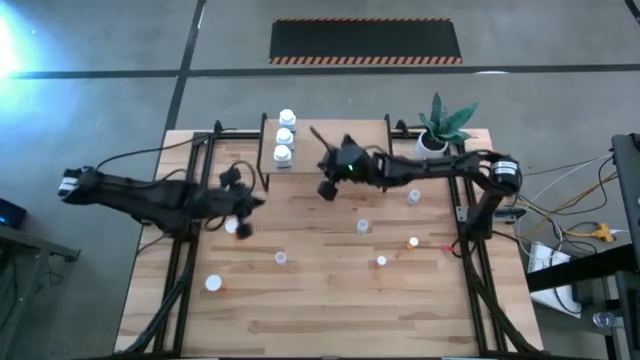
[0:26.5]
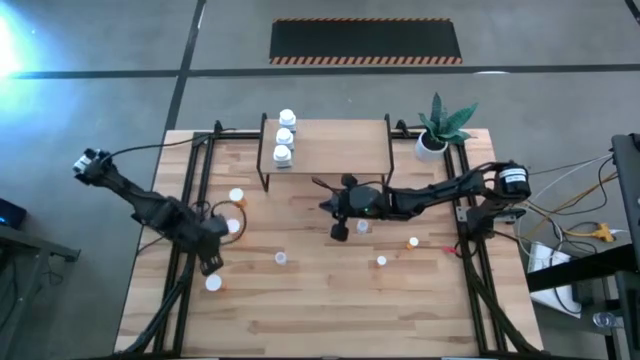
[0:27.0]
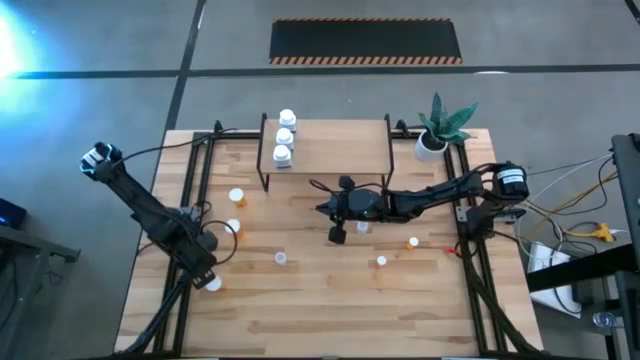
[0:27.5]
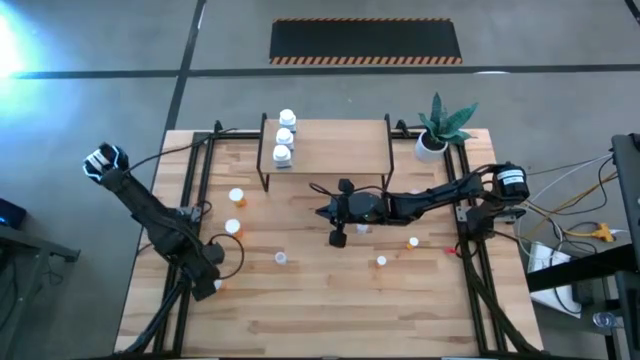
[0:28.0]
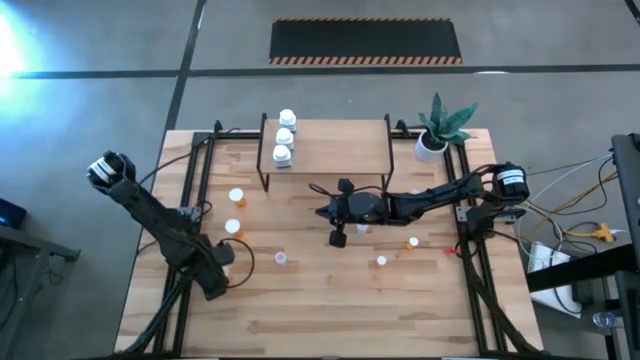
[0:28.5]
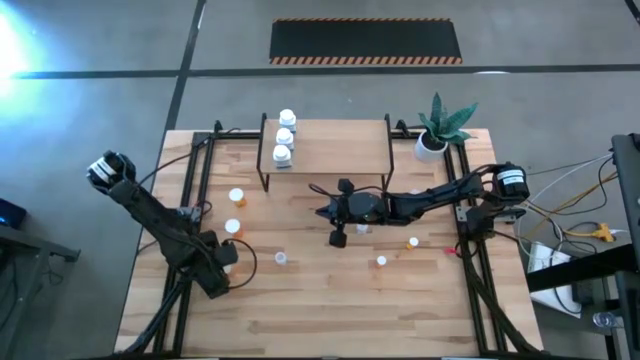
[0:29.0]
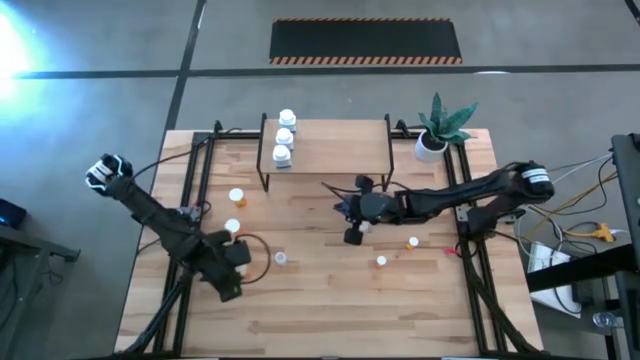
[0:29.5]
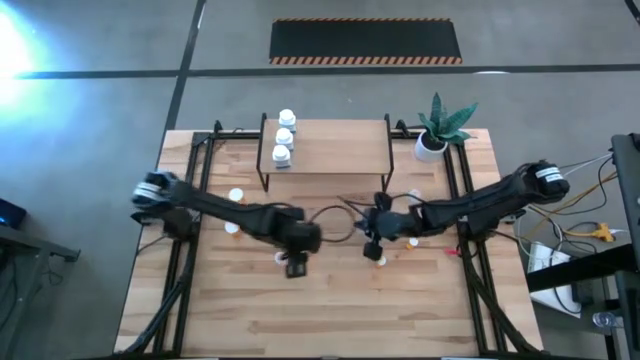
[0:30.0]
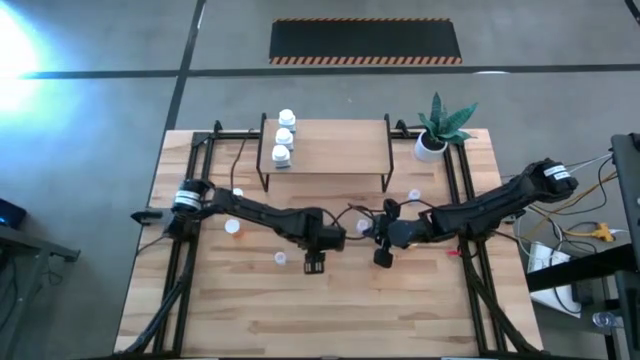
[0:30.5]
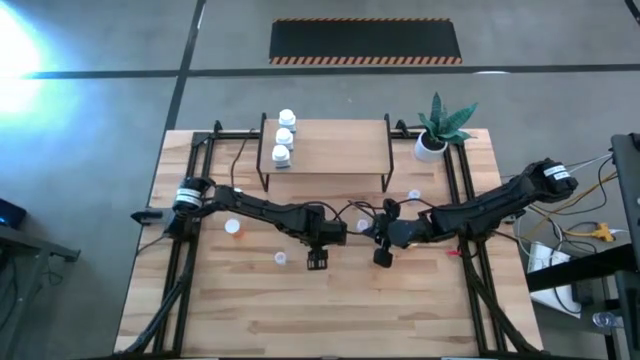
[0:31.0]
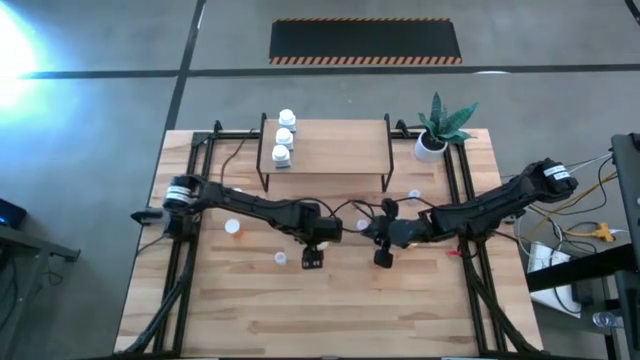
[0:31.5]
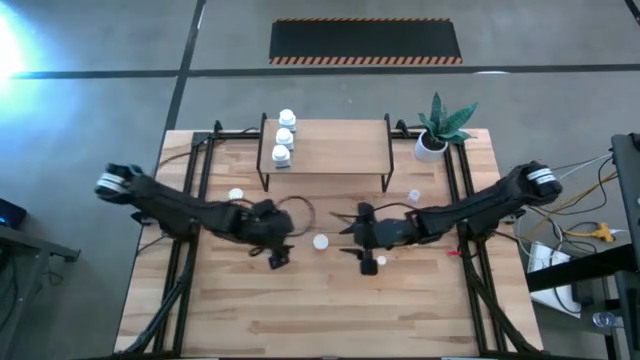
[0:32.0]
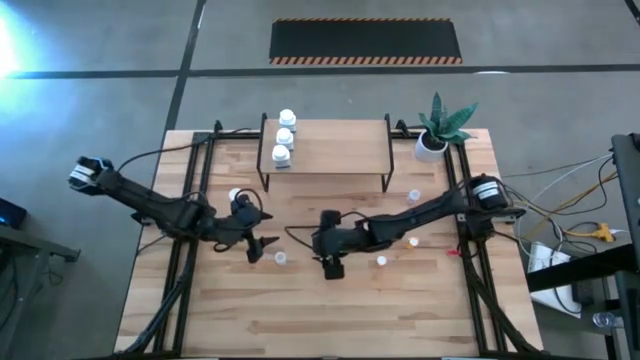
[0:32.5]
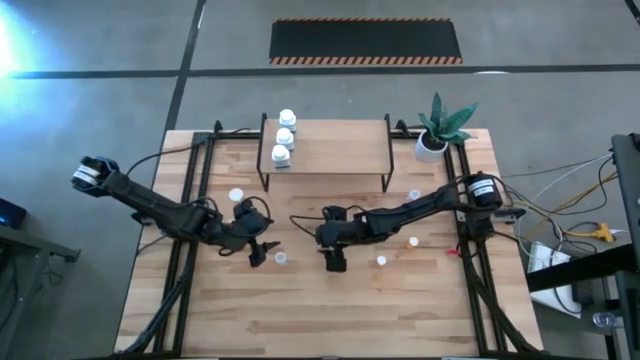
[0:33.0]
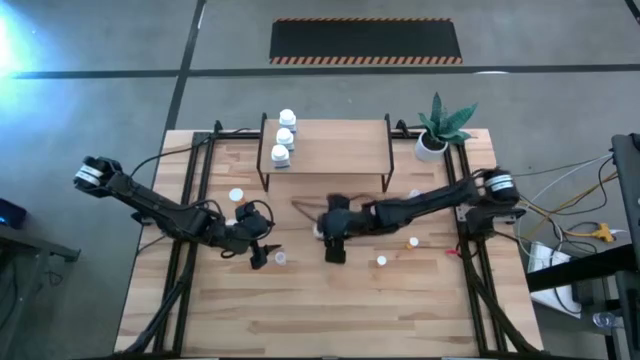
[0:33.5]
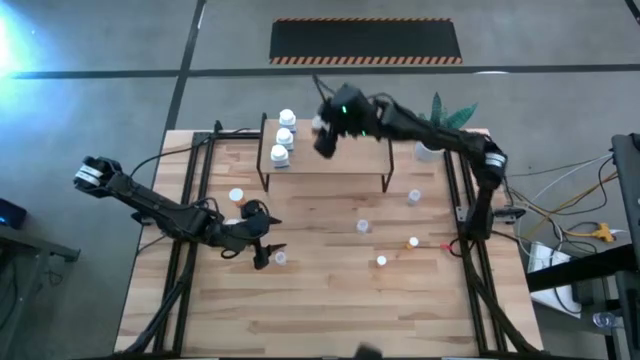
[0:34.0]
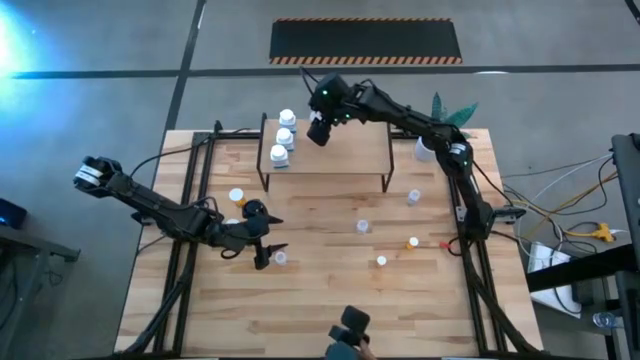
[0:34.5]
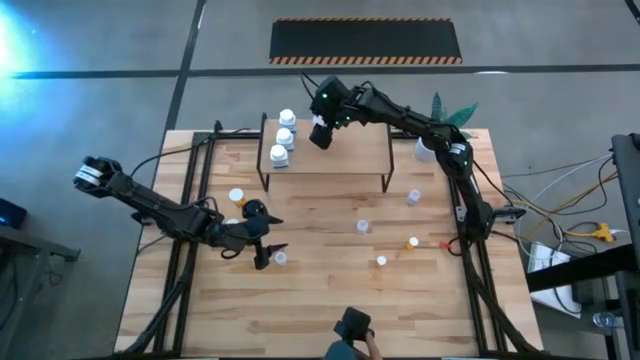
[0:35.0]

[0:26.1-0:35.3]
Task: Pick and place medicine bottles onto shelf by color
Put the bottom big orange pill bottle on the shelf

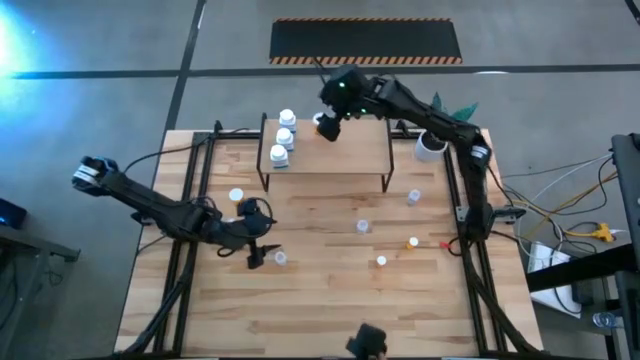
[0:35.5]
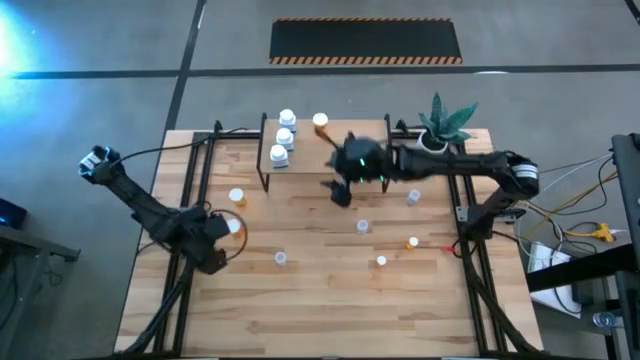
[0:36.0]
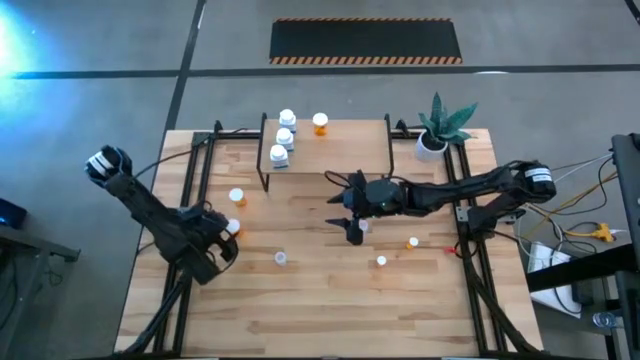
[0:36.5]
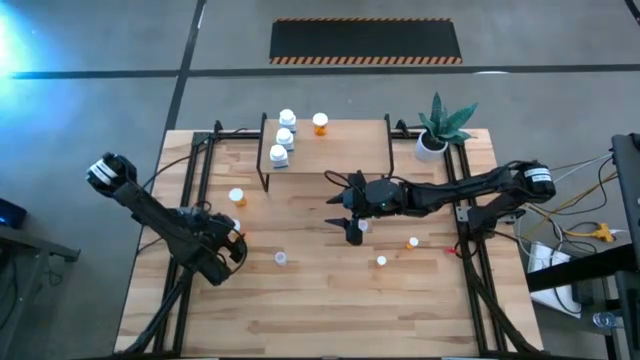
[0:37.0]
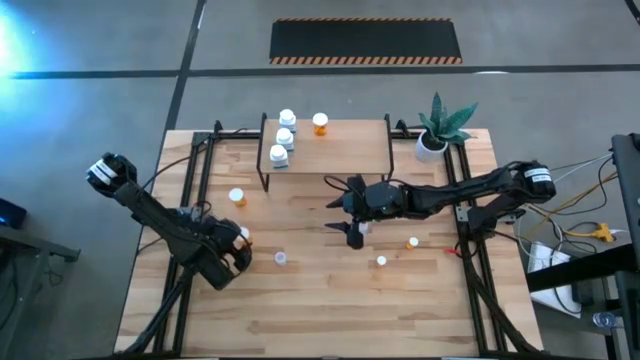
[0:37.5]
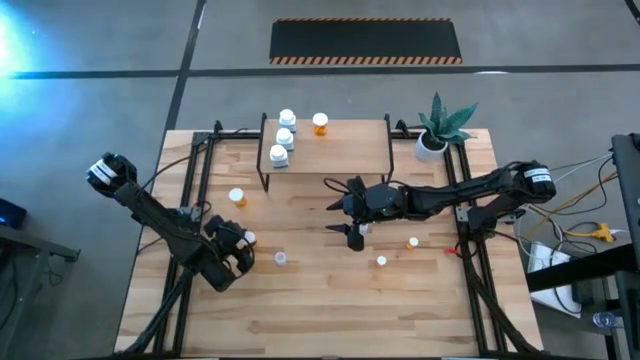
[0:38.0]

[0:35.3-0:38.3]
Put the bottom big orange pill bottle on the shelf aligned with the other big orange pill bottles

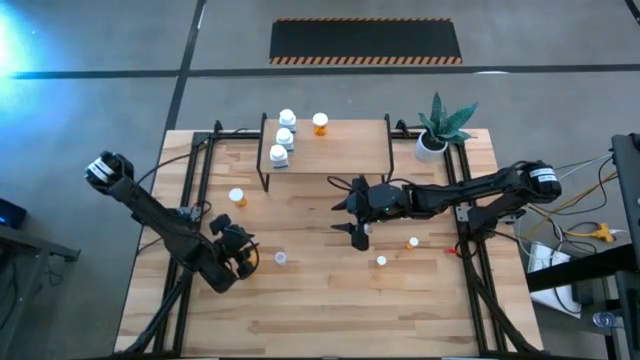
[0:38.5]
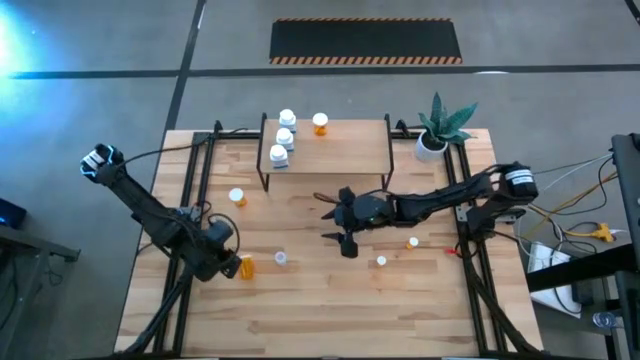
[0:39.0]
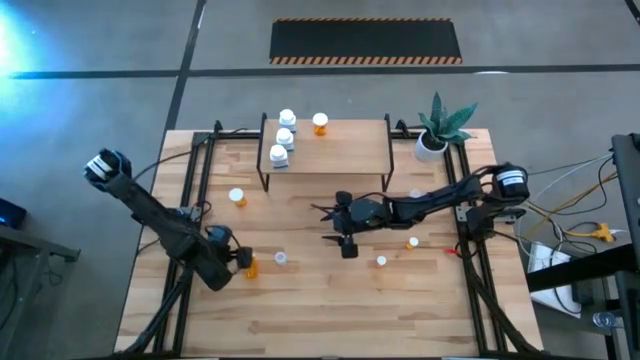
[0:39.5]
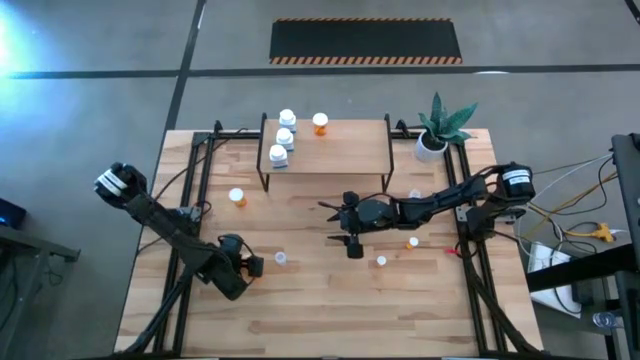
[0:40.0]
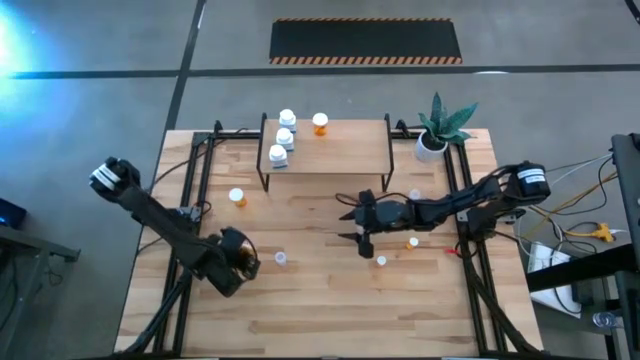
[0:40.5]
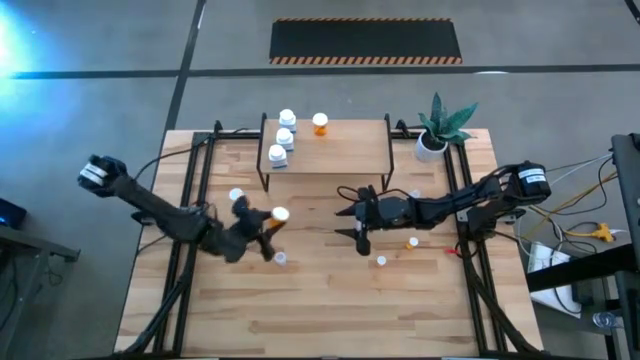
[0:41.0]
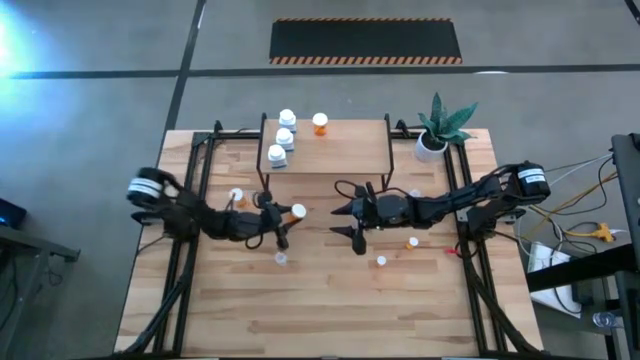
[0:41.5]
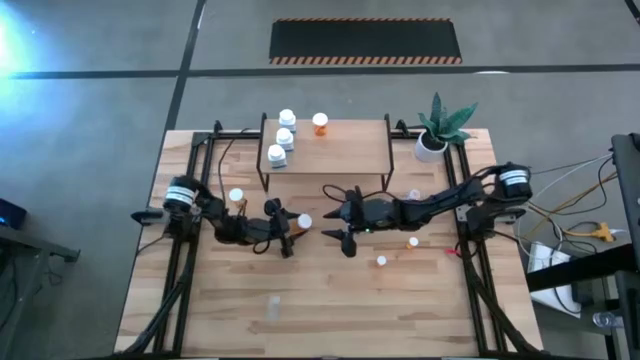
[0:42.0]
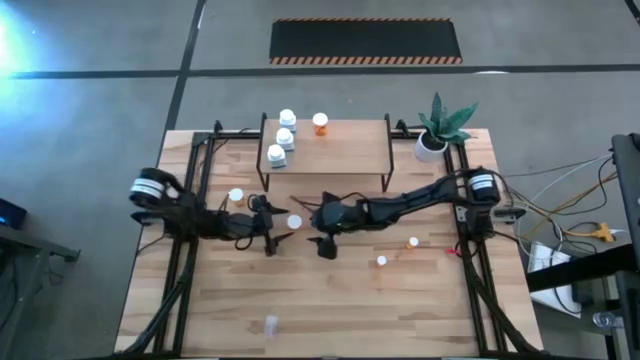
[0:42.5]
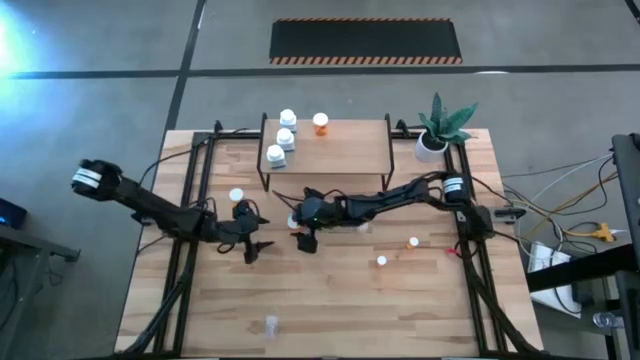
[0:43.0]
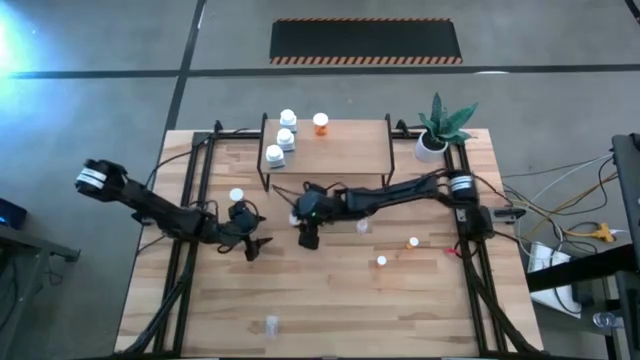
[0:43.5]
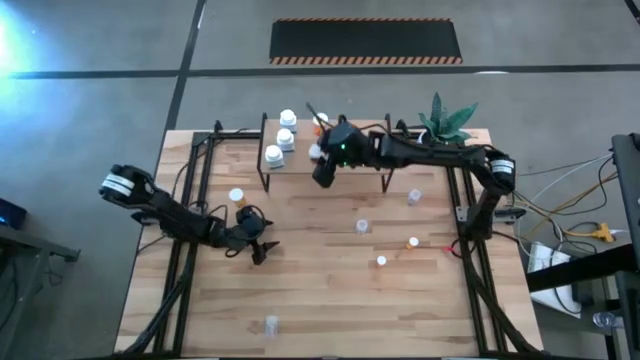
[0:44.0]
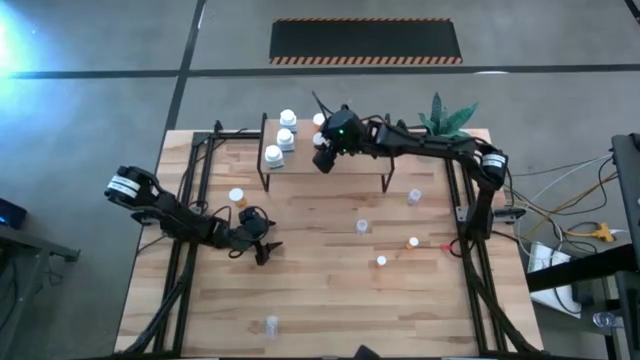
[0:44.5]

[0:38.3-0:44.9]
Put the bottom big orange pill bottle on the shelf aligned with the other big orange pill bottles

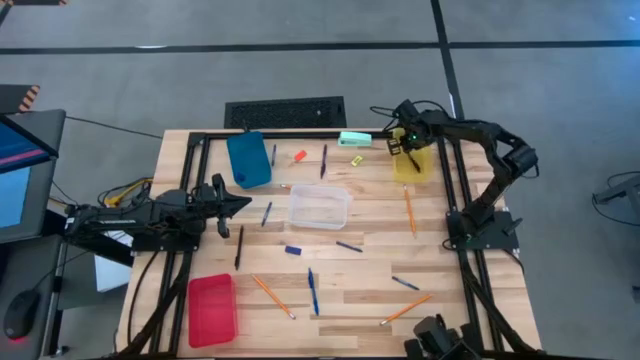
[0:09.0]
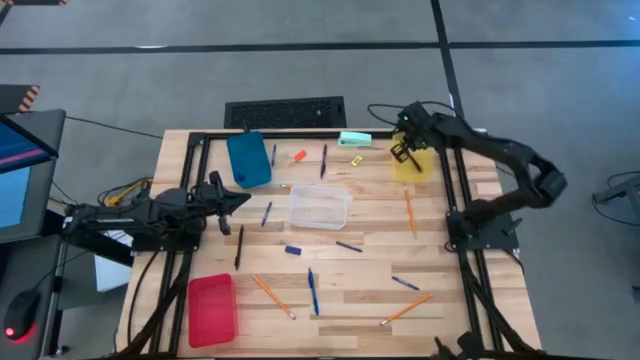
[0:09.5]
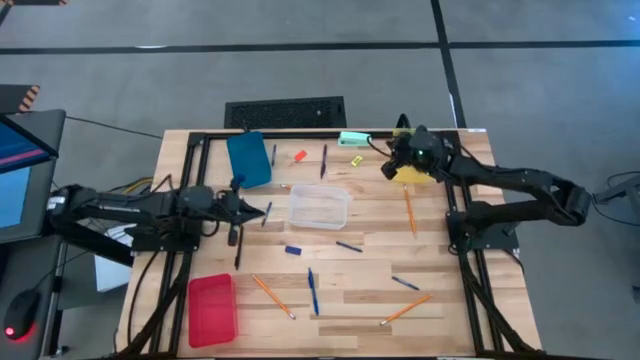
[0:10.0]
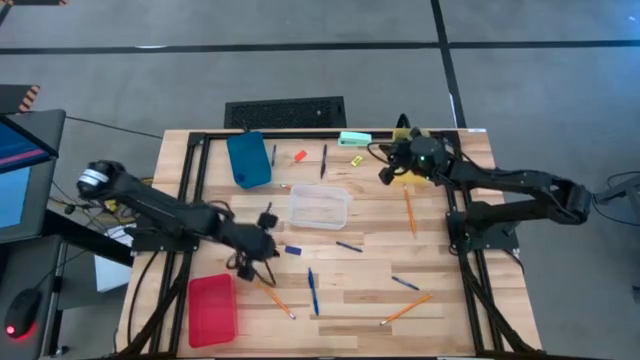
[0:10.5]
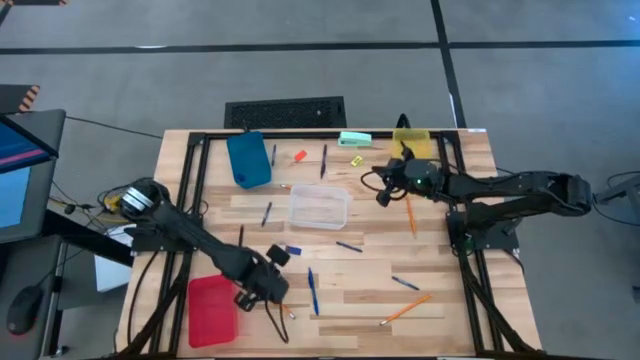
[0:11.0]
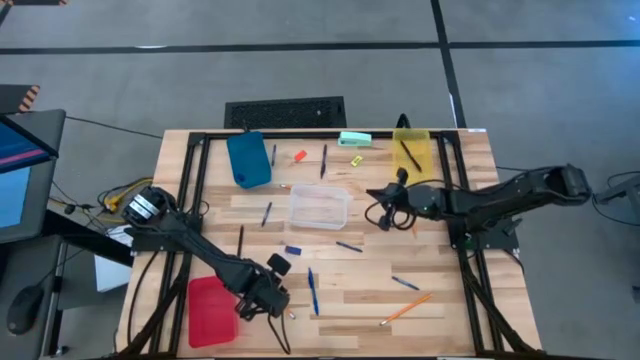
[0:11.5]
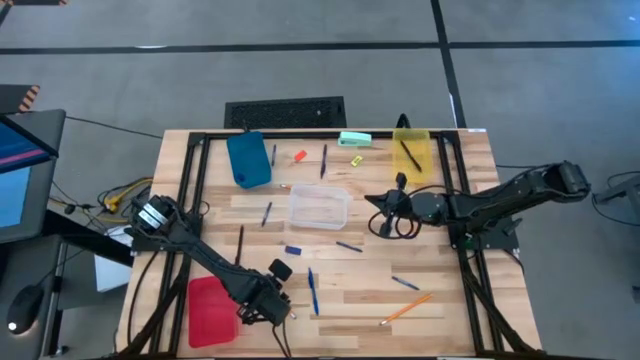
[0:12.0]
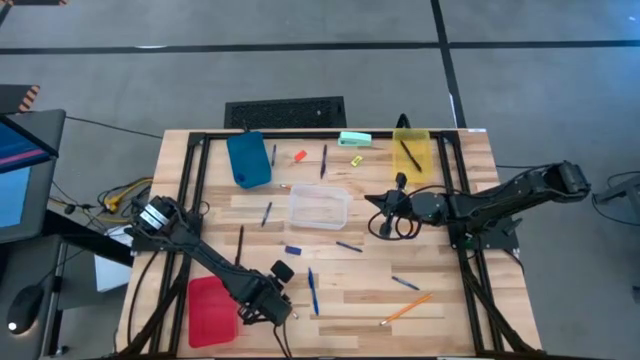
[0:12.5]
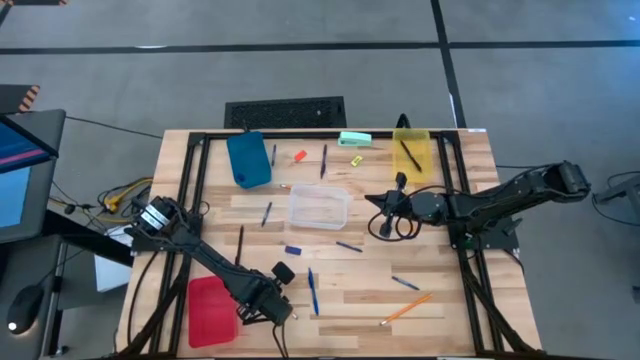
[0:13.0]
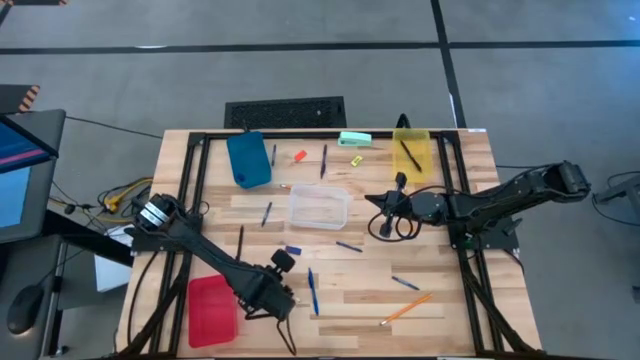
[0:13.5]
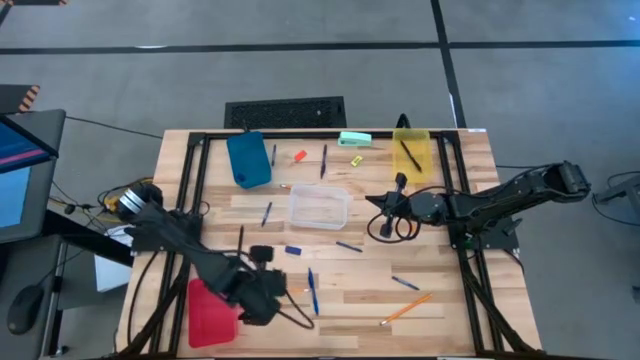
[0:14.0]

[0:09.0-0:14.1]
Task: Sort crayons/erasers/pens/pencils in bins
Put the bottom left yellow pencil into the red bin
